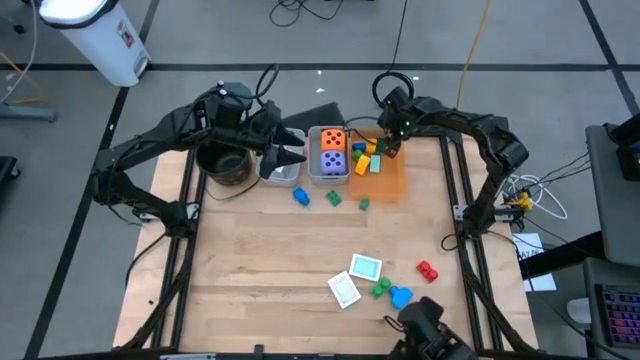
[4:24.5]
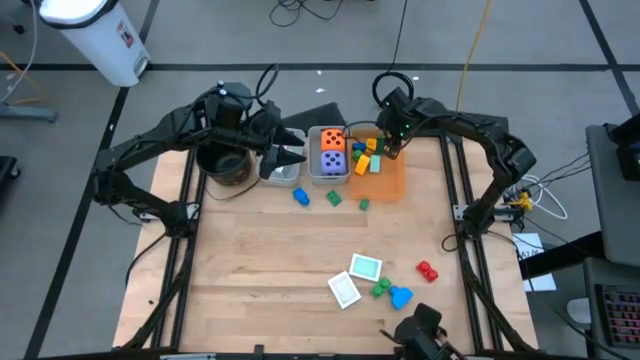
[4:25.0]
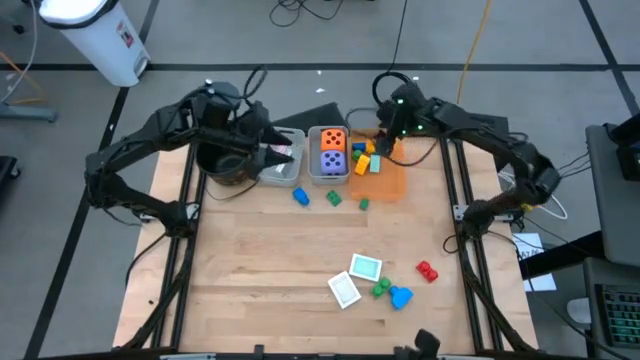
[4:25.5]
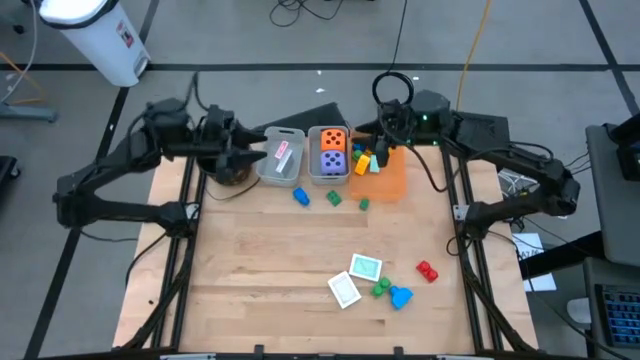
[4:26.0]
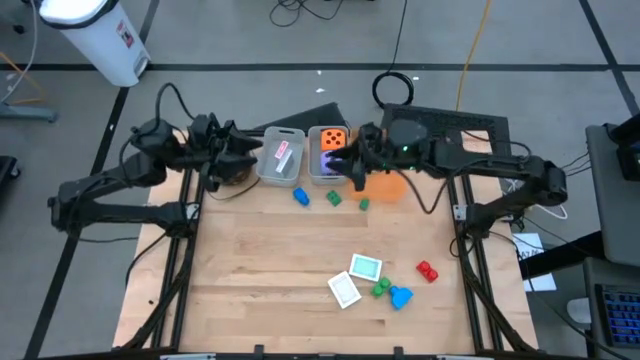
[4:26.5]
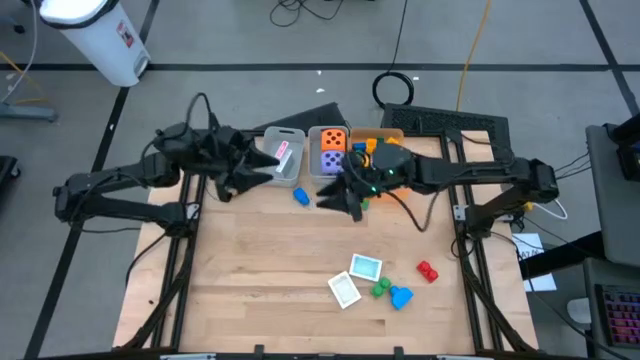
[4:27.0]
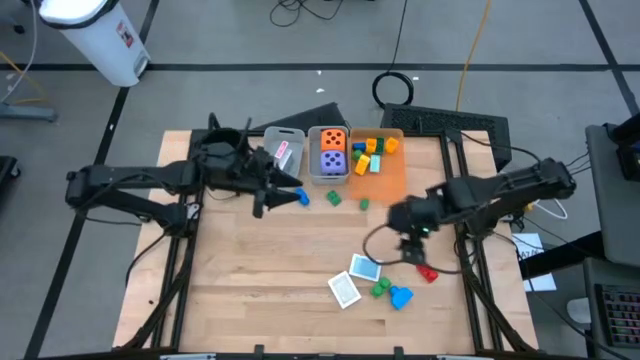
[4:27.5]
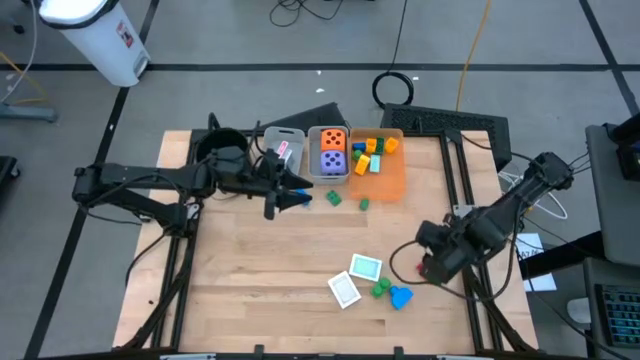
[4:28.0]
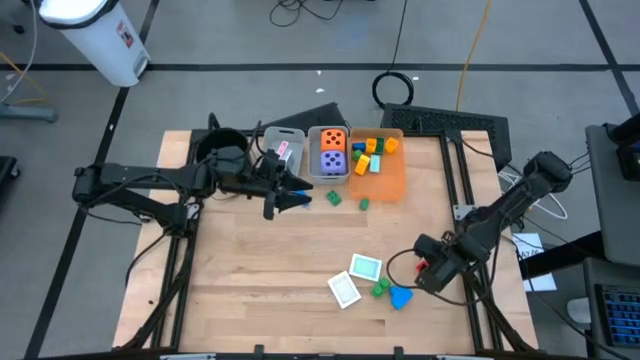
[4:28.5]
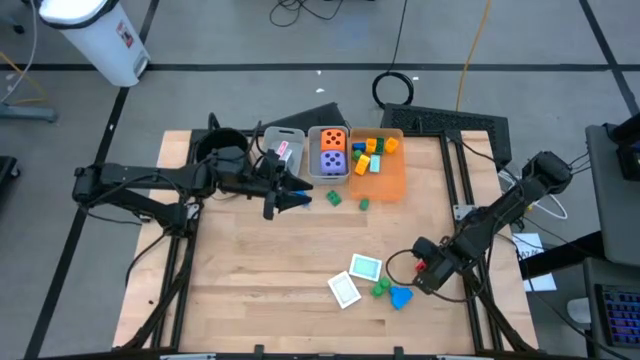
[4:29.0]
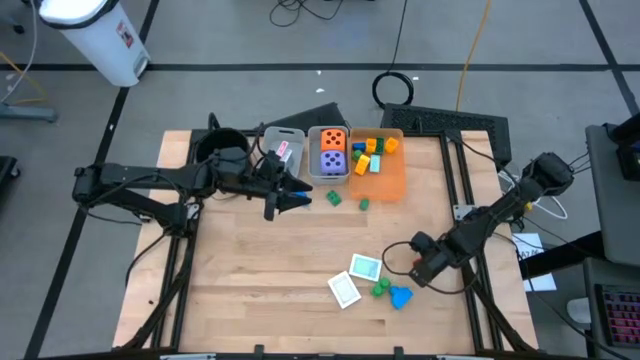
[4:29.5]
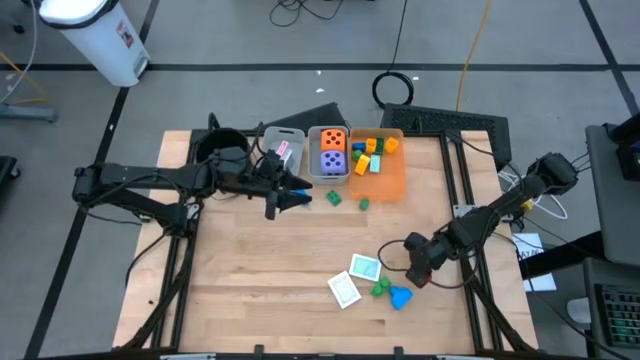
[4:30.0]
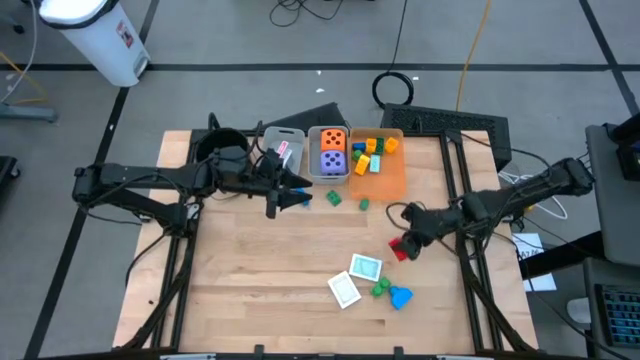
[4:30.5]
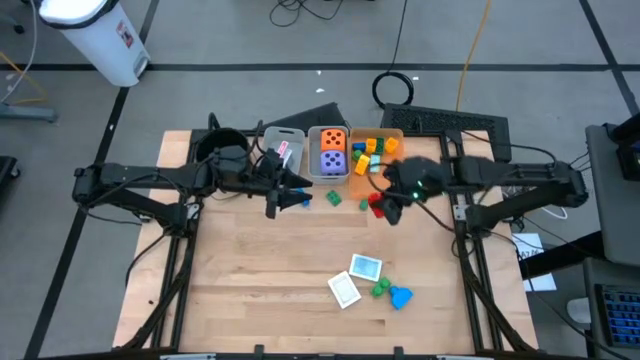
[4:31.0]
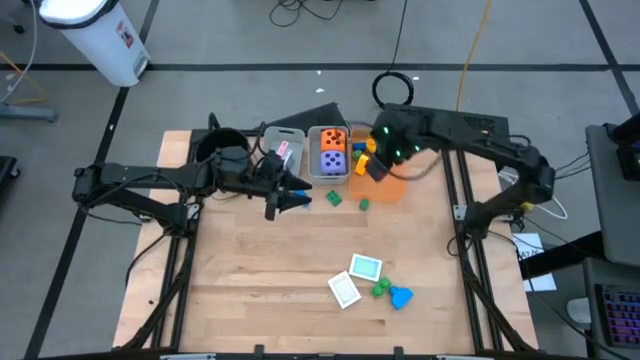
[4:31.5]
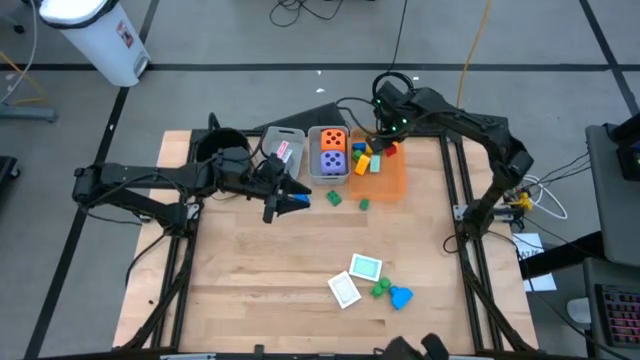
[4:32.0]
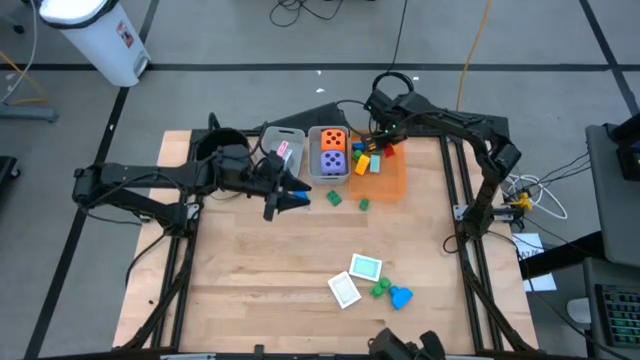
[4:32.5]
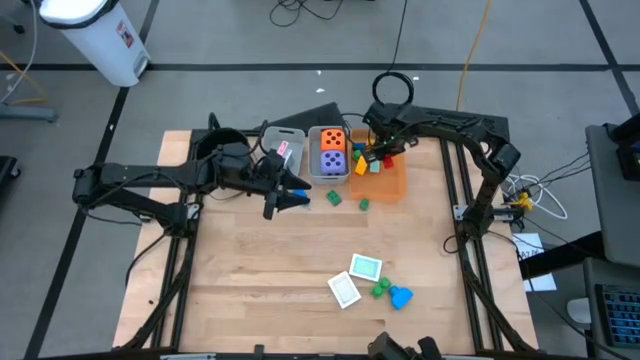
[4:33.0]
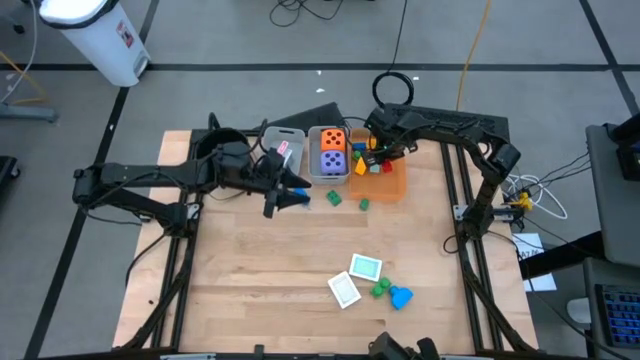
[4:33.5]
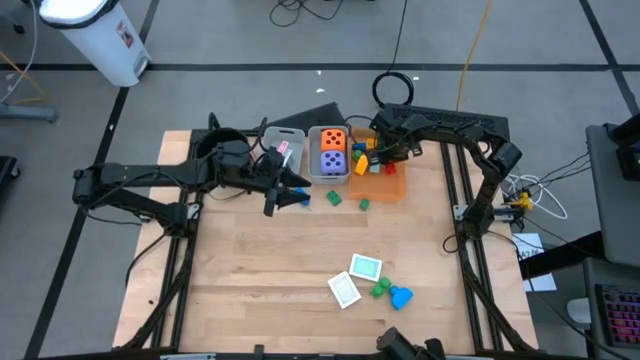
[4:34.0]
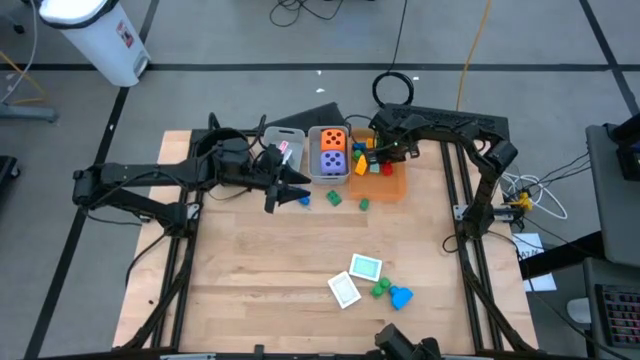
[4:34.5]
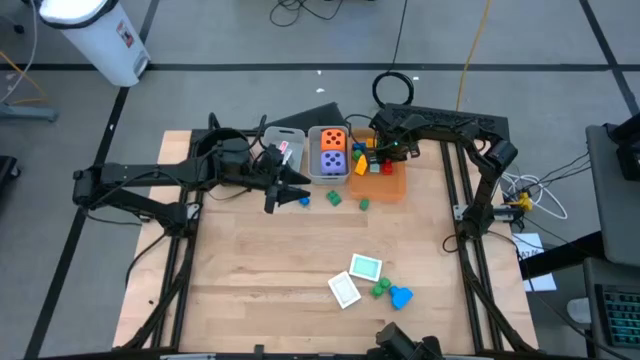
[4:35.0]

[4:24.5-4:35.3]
Task: Pick & Place Toys
Put the red game piece into the orange bin

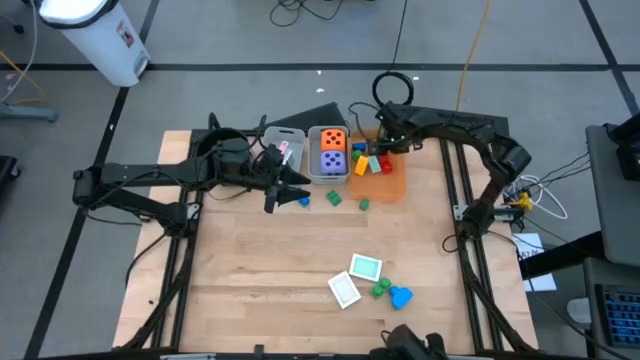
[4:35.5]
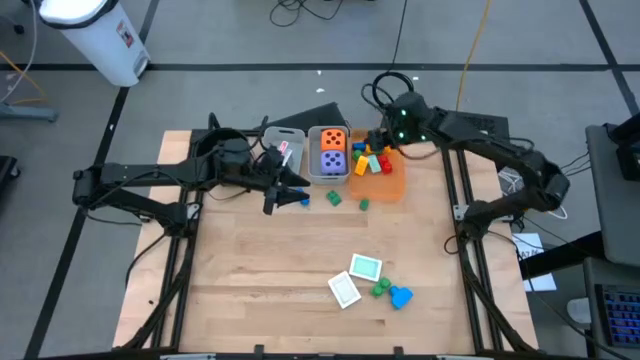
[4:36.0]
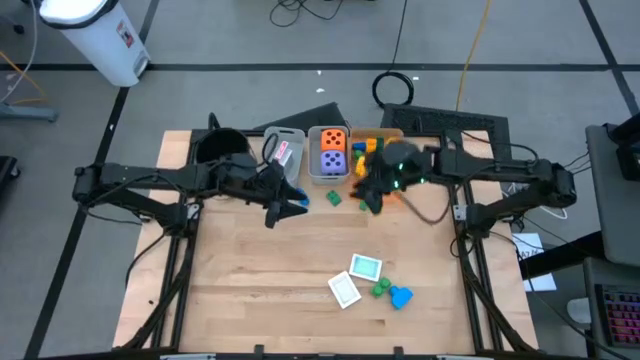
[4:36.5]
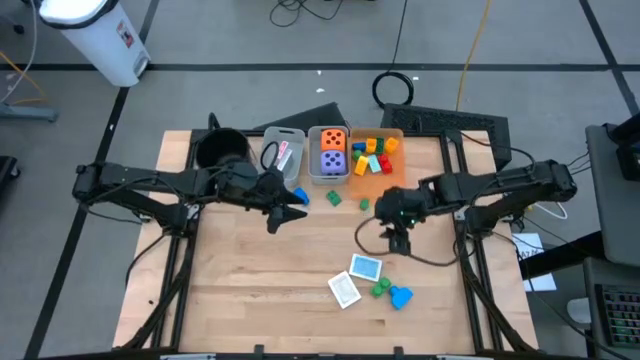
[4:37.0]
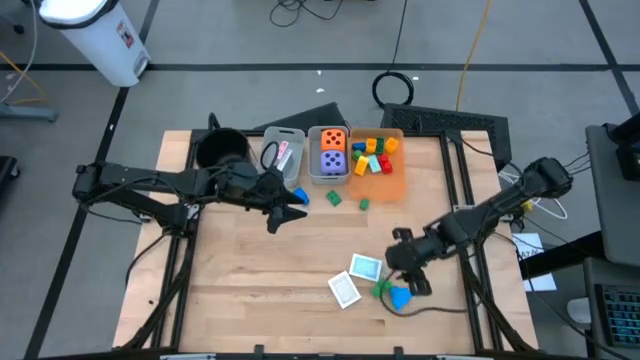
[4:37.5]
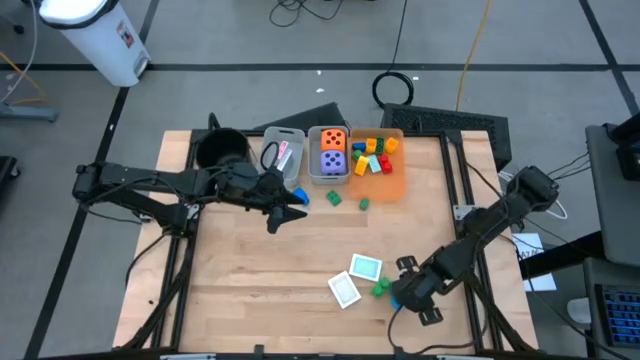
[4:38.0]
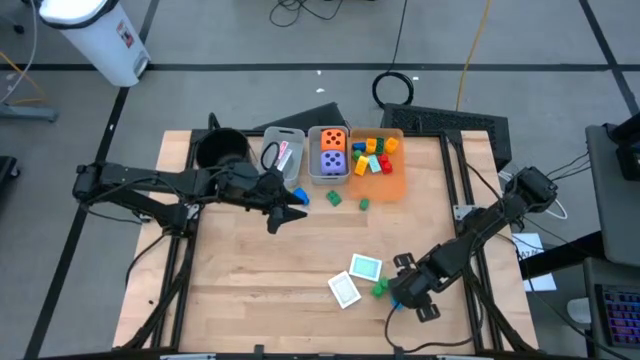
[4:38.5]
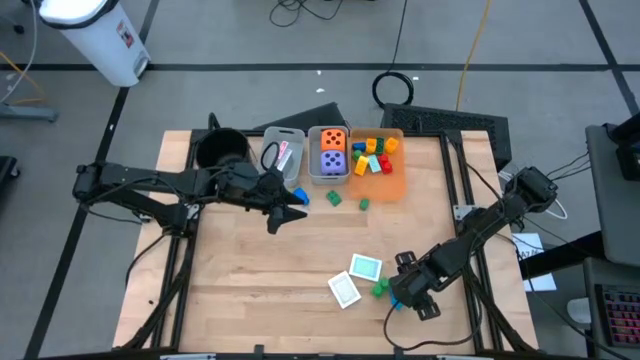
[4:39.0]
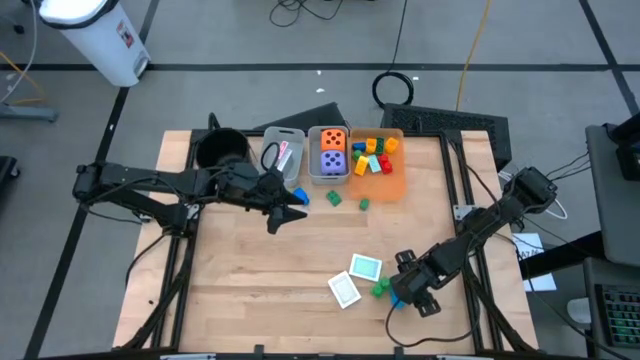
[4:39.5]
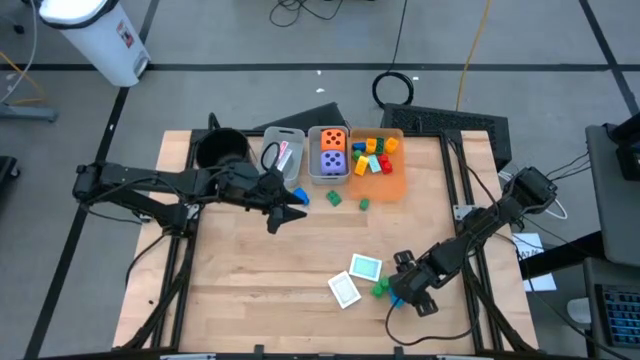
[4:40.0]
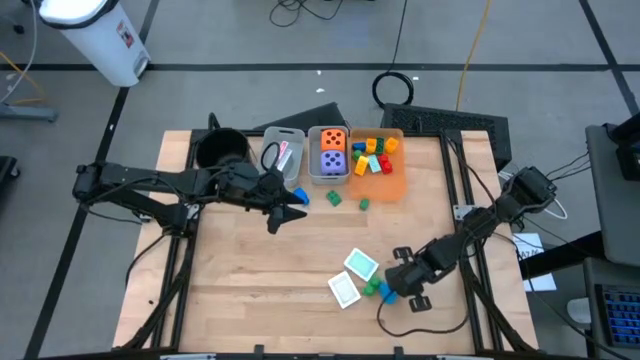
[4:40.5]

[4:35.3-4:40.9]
Put the bottom blue game piece into the orange bin

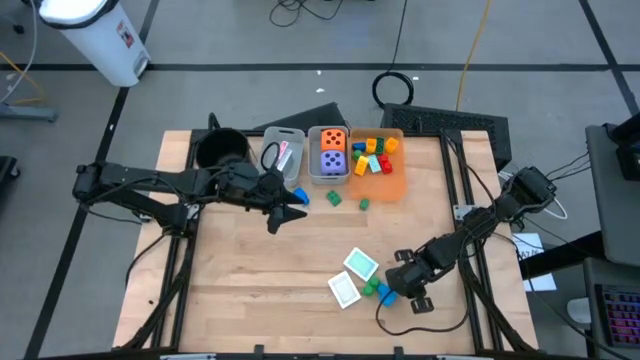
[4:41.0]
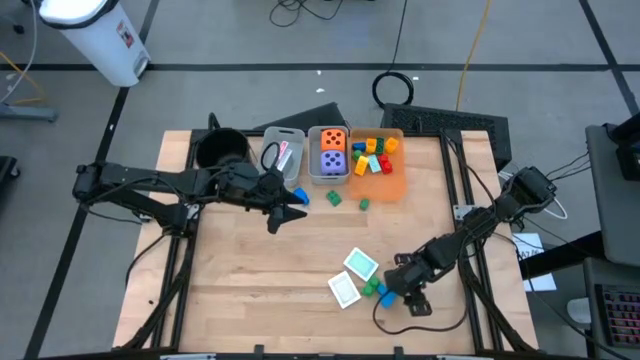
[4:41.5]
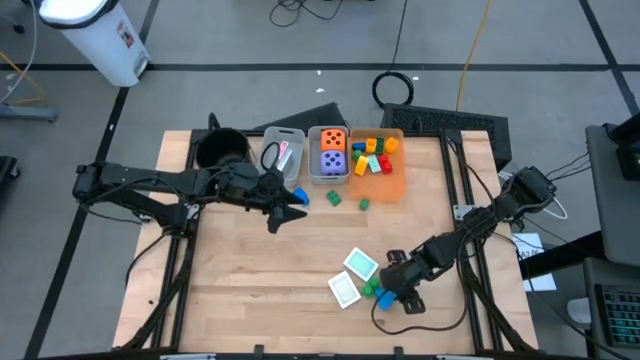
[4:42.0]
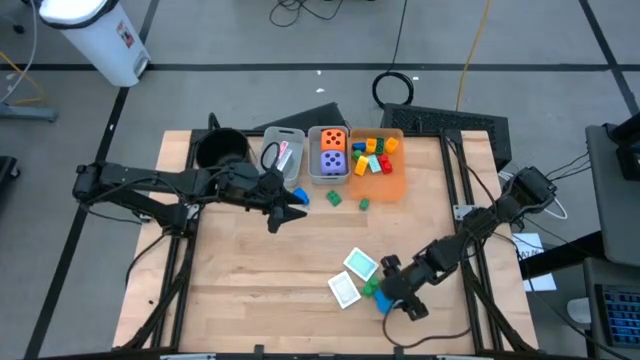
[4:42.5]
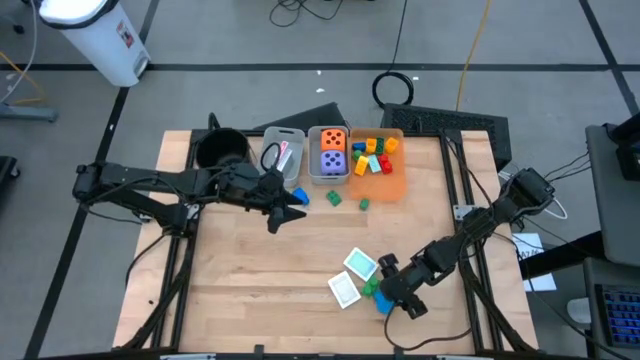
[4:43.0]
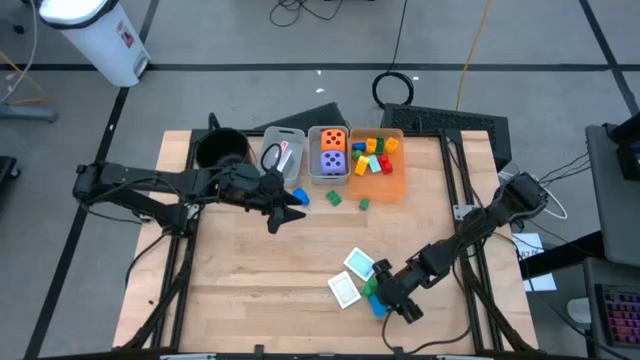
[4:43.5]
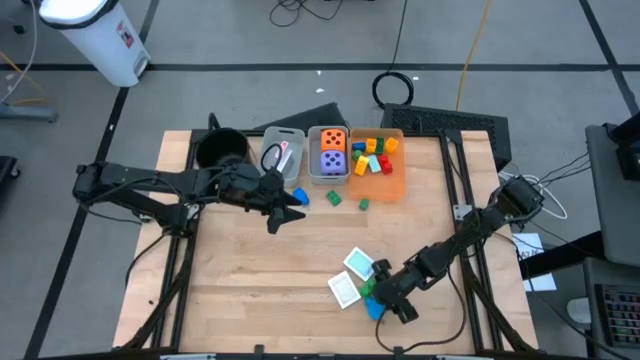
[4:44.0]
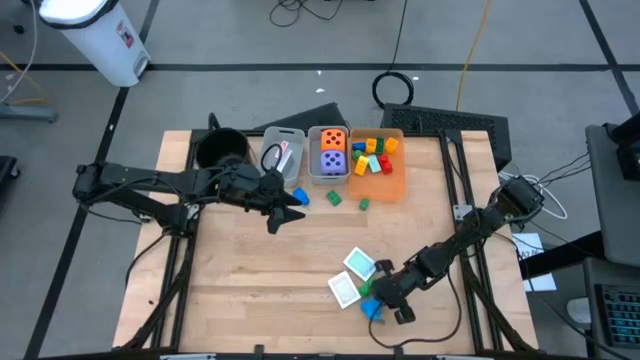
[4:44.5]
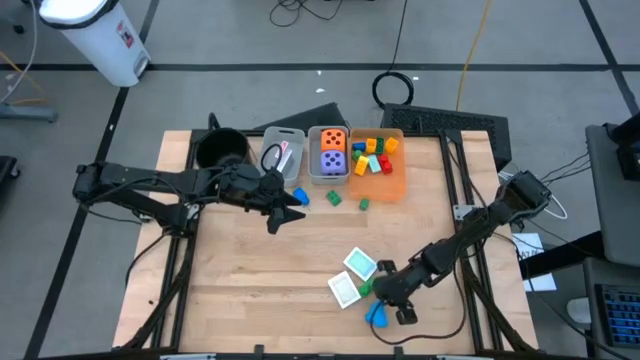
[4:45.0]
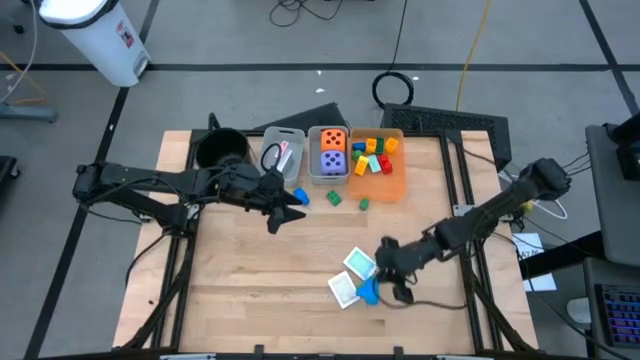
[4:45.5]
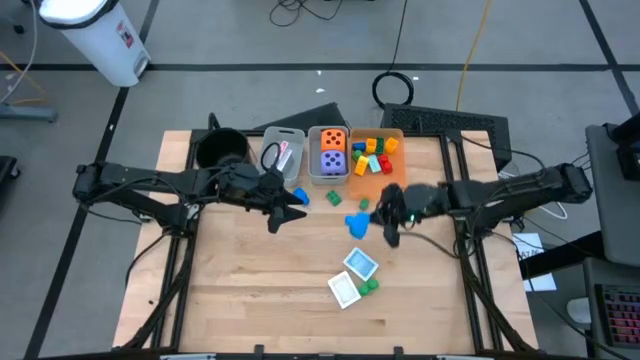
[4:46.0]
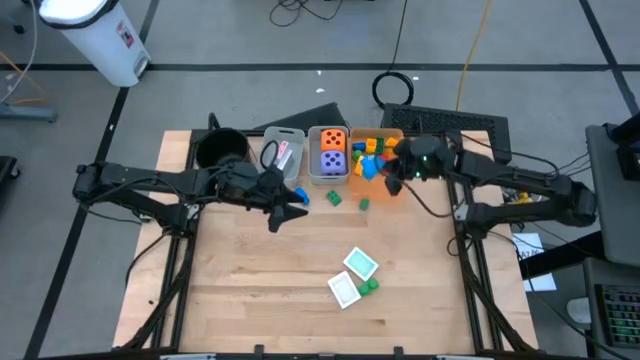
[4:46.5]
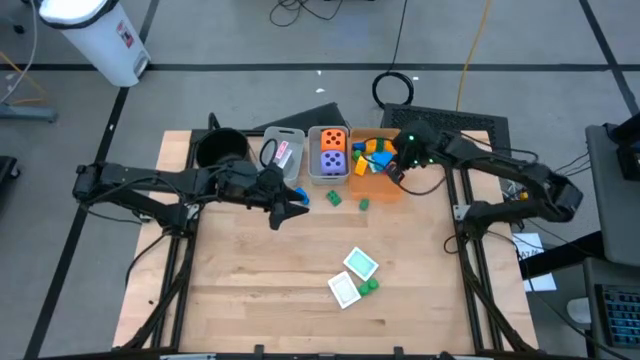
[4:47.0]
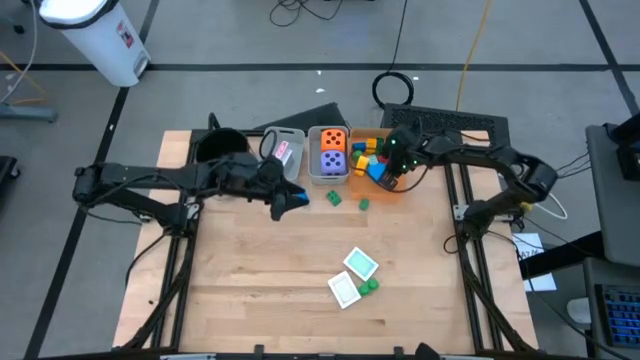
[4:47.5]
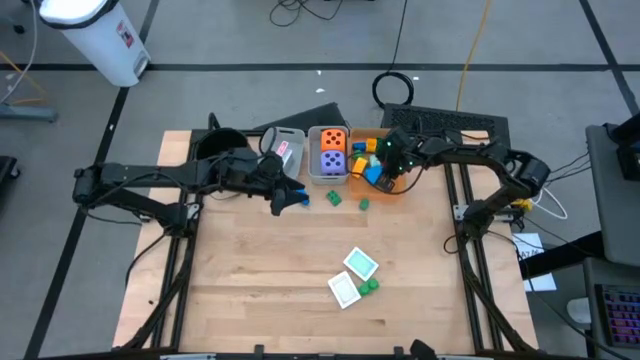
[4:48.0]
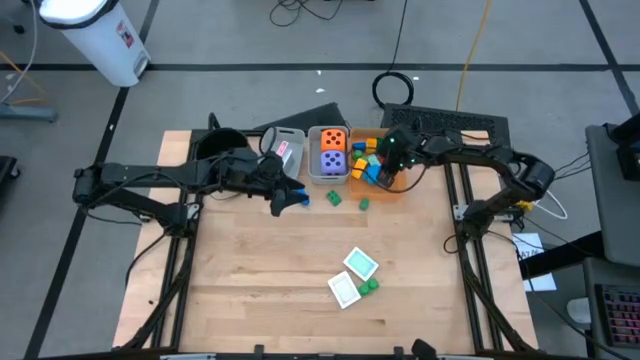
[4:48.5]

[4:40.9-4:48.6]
Put the bottom blue game piece into the orange bin
